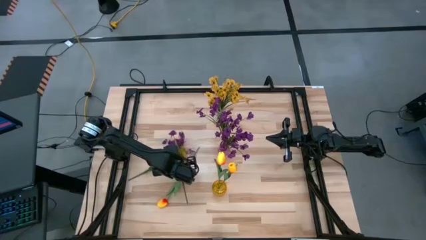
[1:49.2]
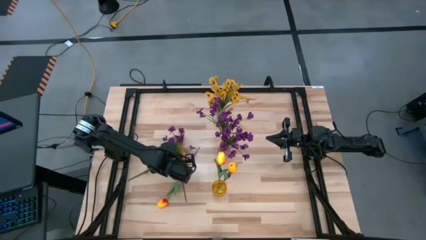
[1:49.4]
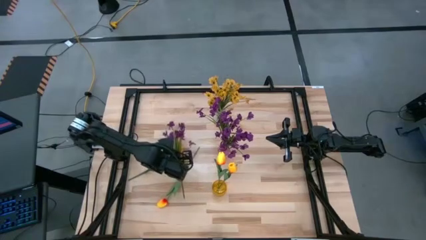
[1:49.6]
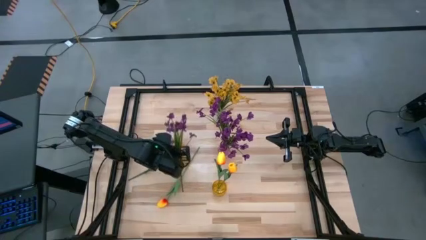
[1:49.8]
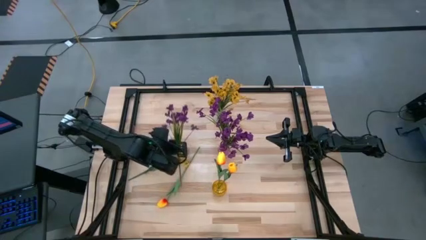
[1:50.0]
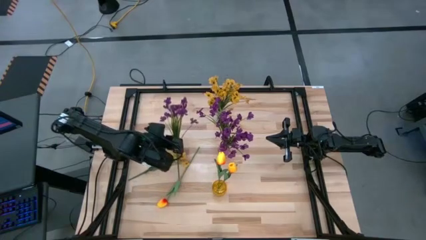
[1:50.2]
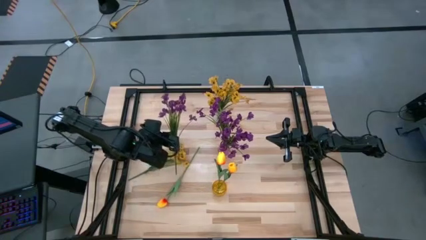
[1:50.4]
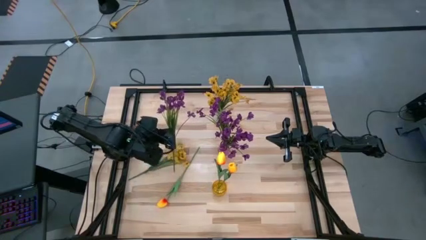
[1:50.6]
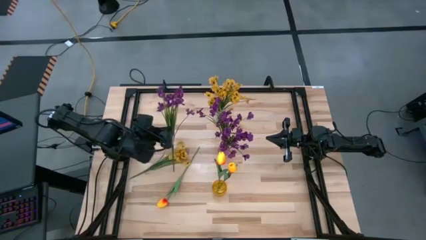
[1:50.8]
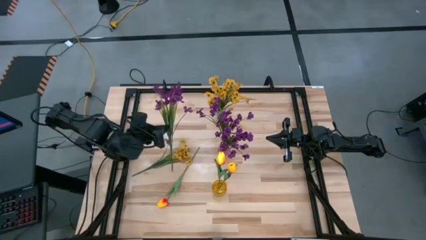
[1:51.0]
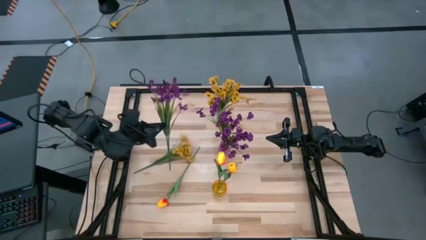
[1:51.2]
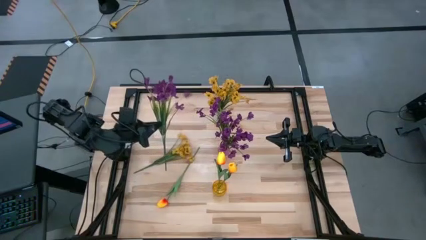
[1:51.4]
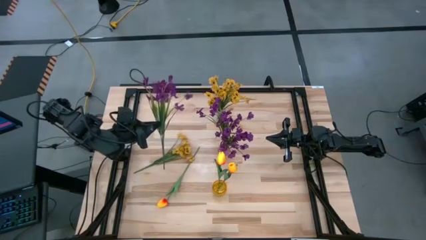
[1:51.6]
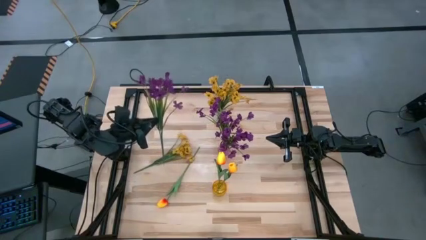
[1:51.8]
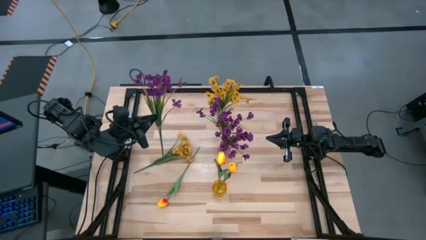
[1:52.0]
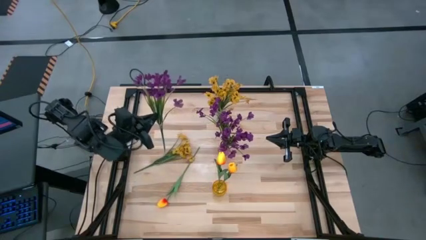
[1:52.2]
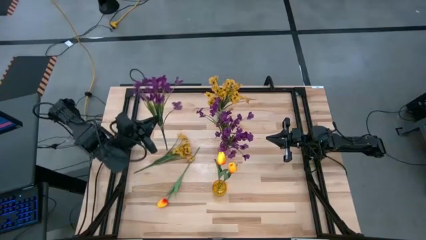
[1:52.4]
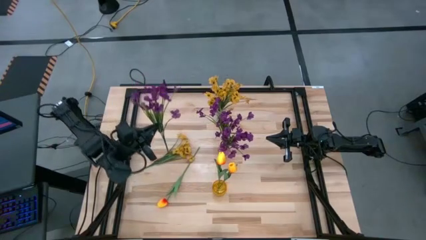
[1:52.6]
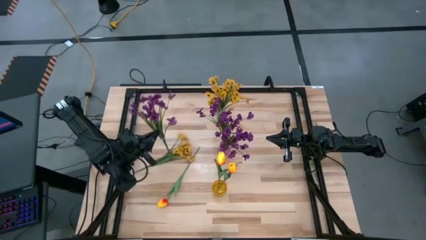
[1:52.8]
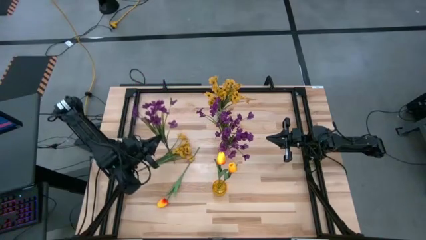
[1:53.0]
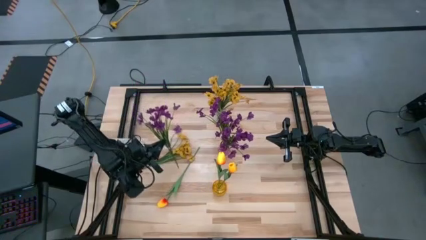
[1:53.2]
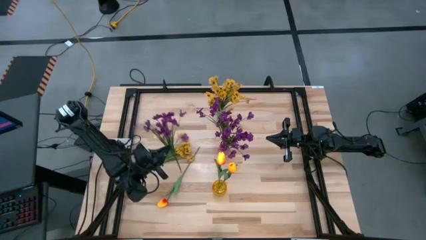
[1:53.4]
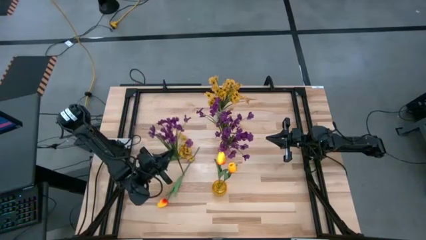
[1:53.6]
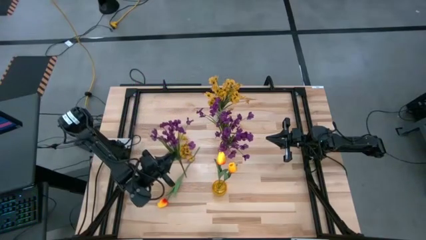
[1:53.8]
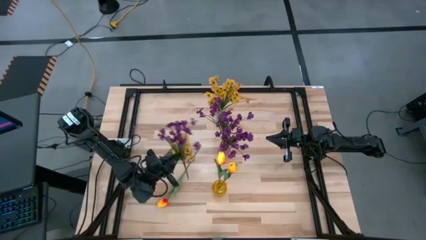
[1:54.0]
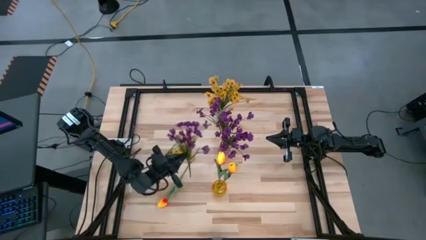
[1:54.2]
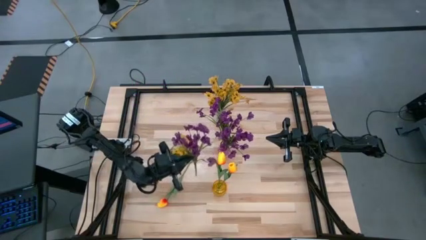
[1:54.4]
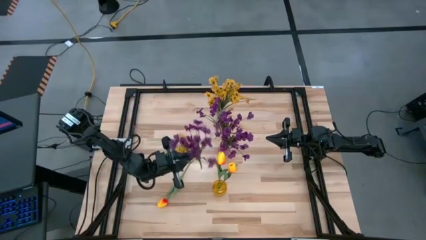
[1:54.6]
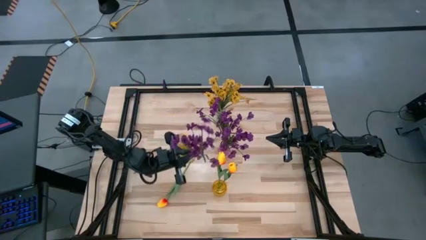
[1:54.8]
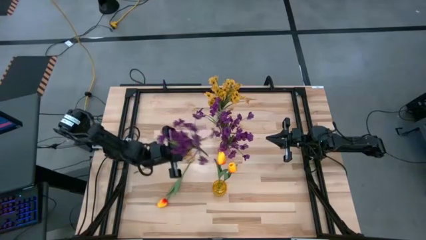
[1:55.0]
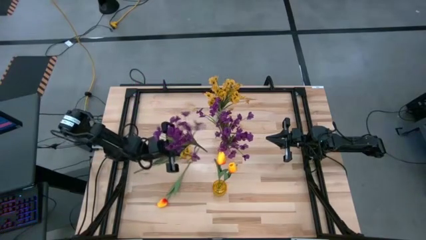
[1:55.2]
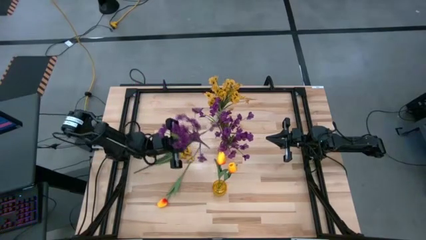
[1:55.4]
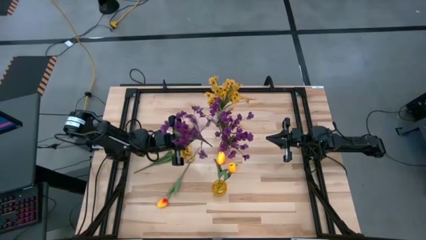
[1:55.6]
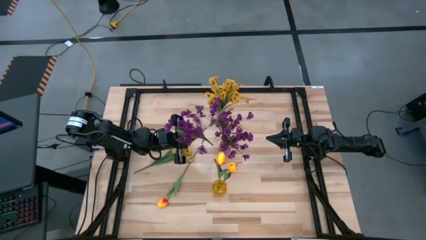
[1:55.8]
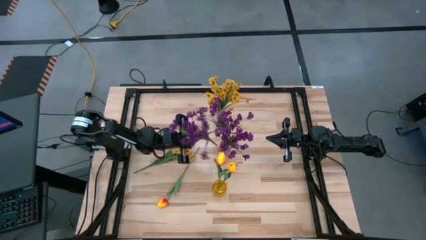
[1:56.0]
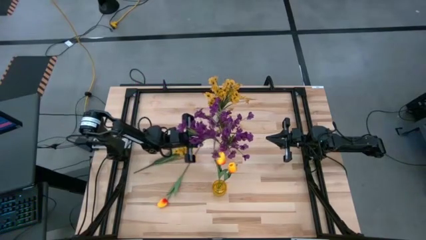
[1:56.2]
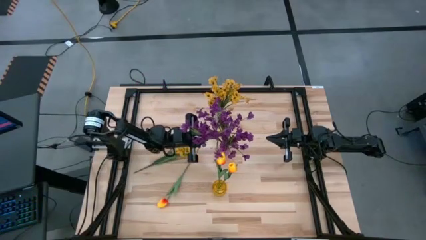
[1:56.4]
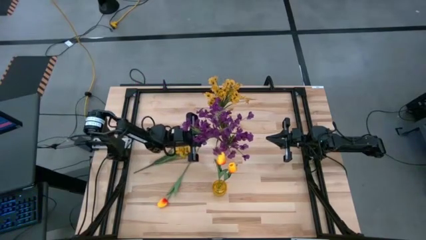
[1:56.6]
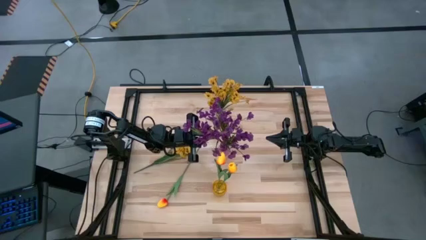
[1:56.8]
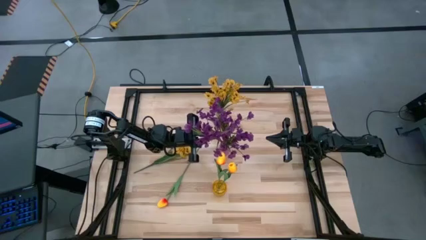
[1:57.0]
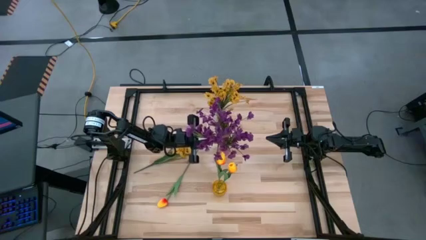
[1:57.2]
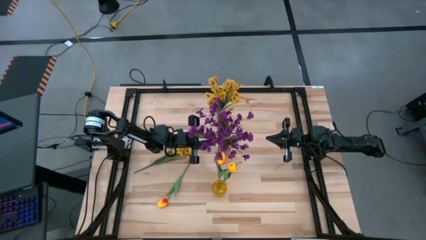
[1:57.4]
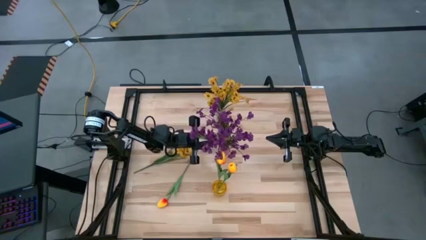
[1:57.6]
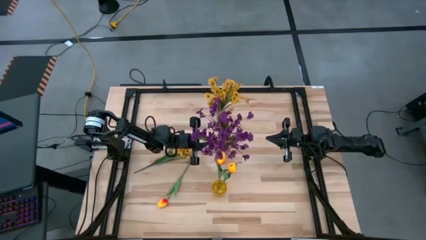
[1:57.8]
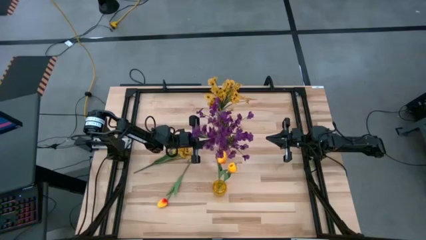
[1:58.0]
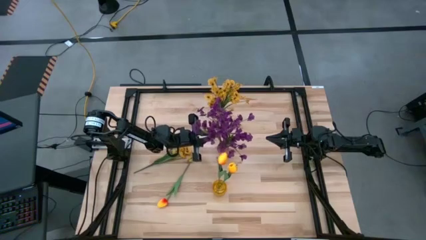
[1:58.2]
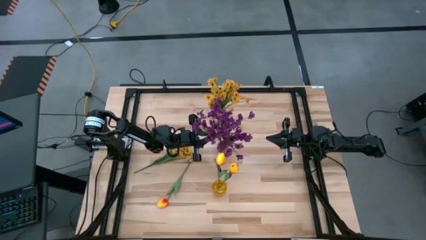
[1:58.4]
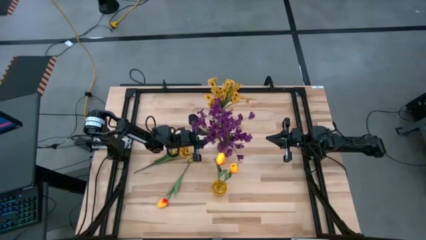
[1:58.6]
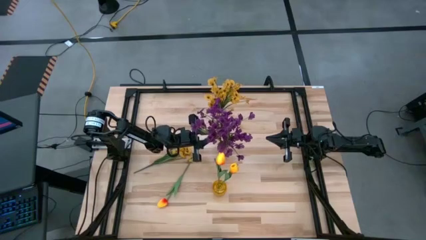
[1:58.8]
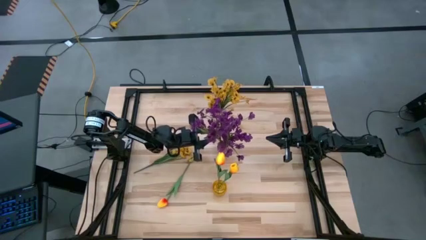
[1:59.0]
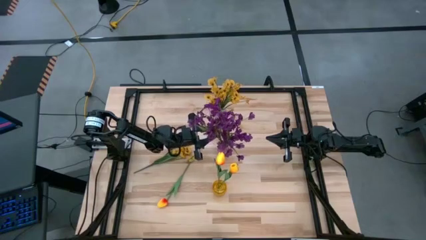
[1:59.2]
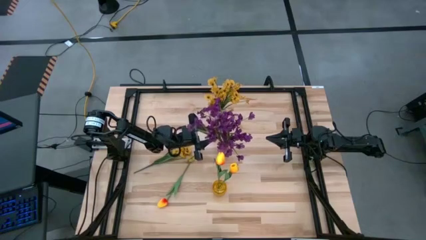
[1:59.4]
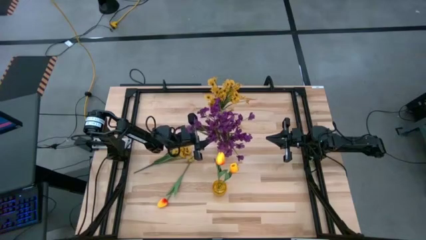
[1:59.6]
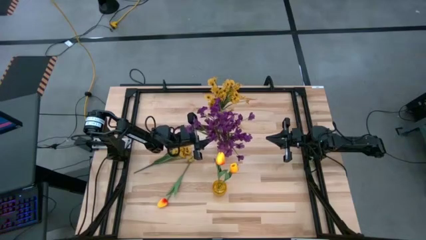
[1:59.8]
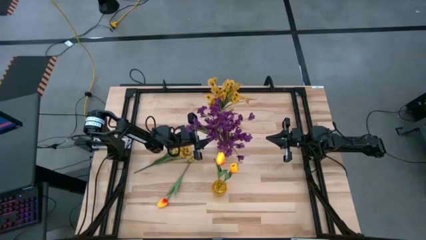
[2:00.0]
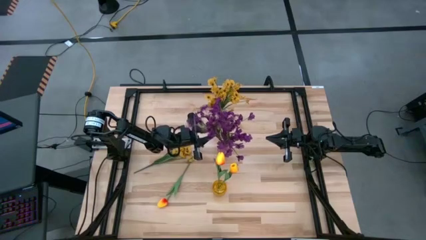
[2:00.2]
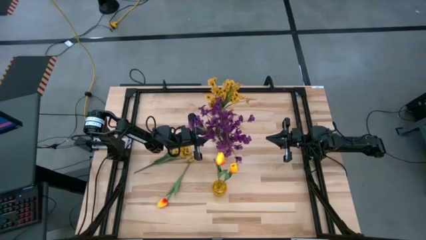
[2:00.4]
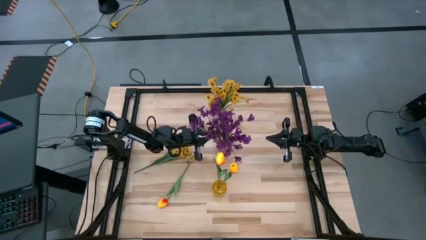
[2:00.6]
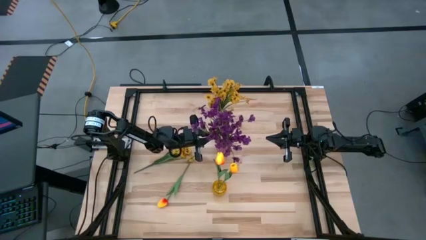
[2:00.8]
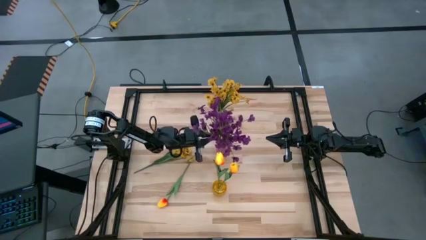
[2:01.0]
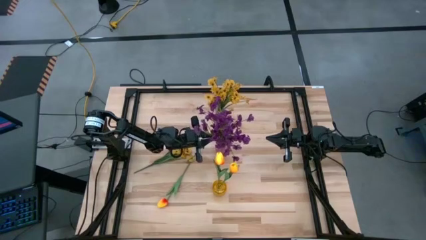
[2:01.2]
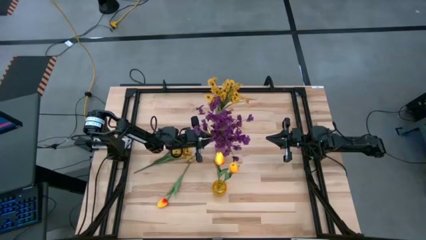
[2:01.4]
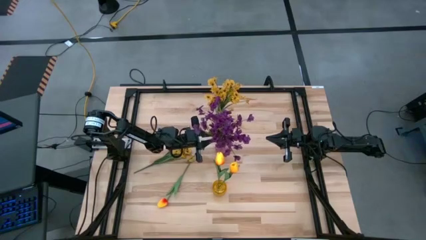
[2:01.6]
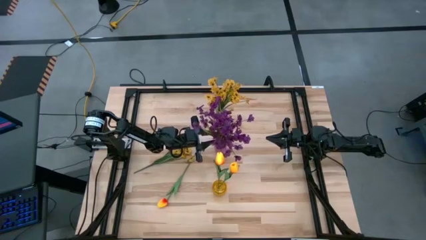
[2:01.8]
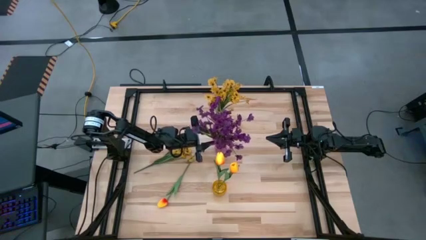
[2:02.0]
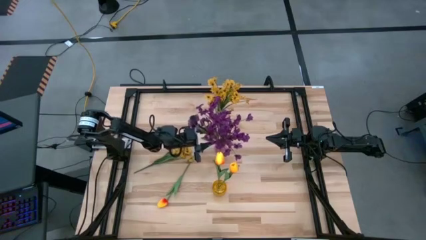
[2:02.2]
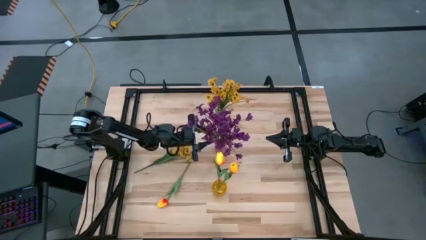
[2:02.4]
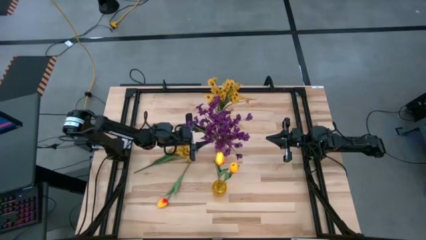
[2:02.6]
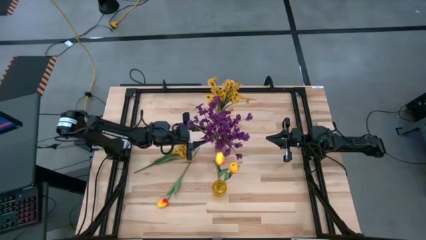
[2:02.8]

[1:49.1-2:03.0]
Task: Sort flowers into vase by color
Put the violet flowers into the violet vase
